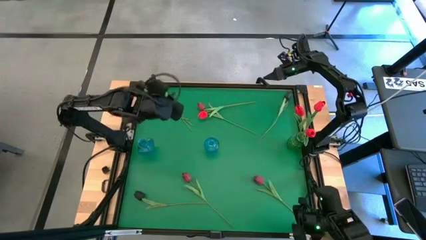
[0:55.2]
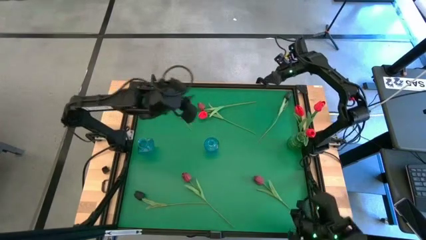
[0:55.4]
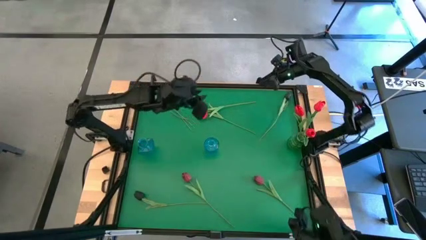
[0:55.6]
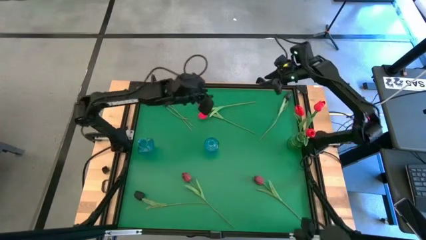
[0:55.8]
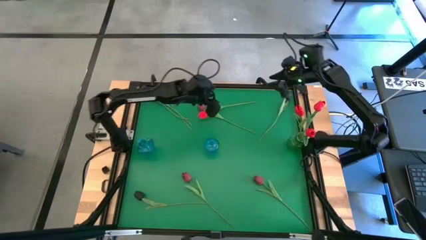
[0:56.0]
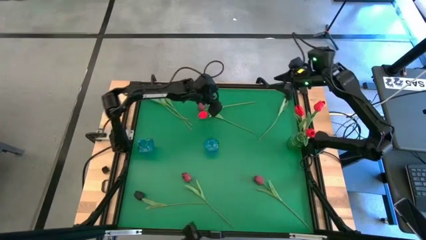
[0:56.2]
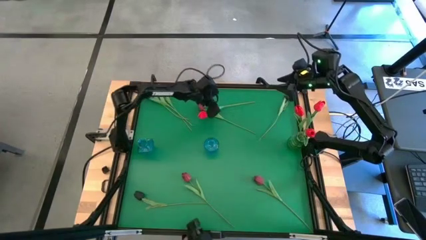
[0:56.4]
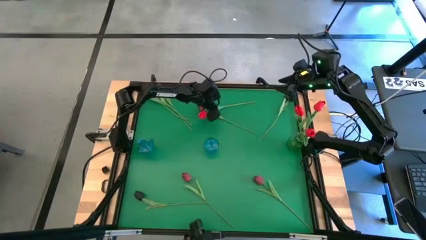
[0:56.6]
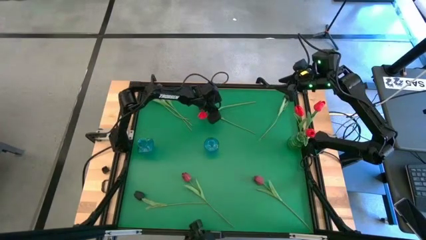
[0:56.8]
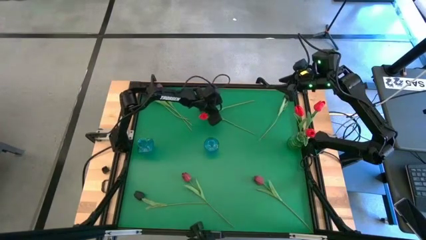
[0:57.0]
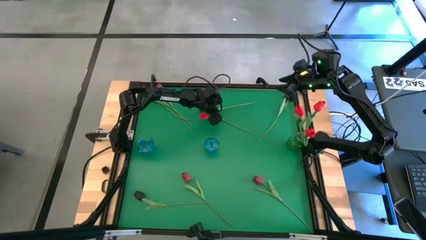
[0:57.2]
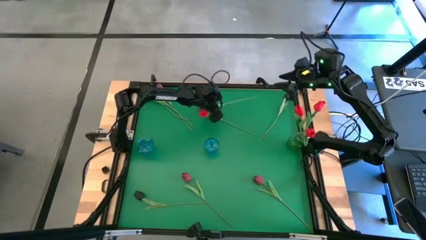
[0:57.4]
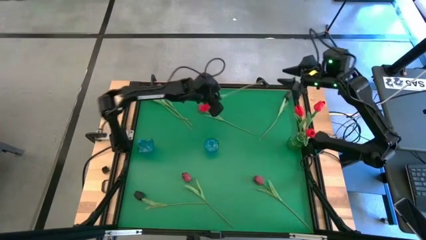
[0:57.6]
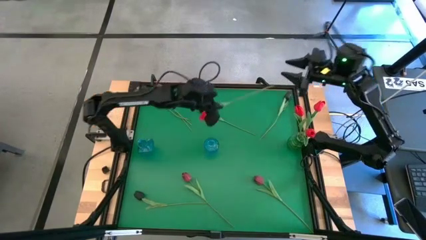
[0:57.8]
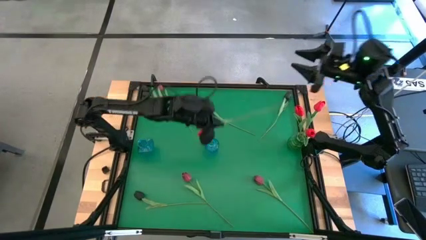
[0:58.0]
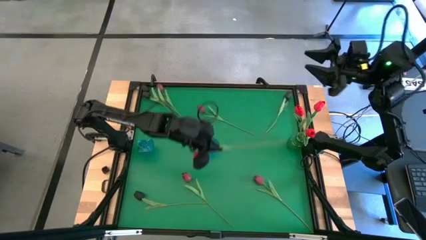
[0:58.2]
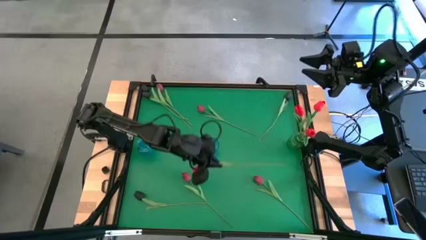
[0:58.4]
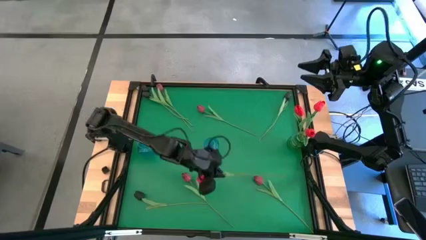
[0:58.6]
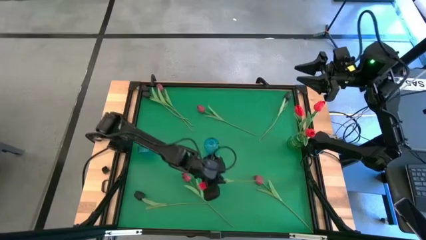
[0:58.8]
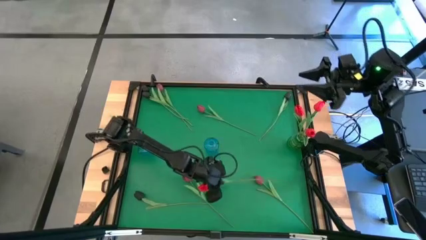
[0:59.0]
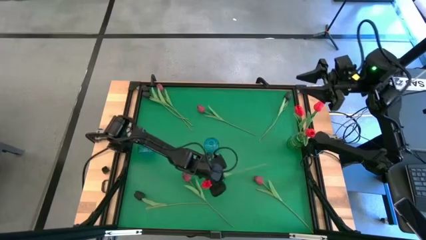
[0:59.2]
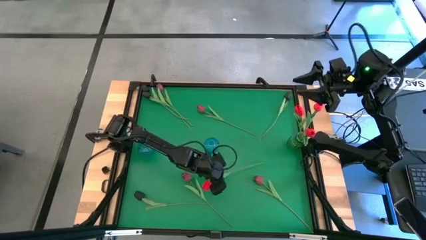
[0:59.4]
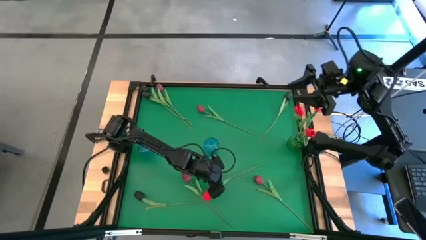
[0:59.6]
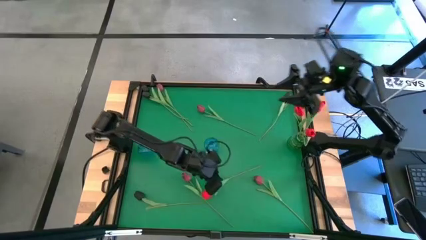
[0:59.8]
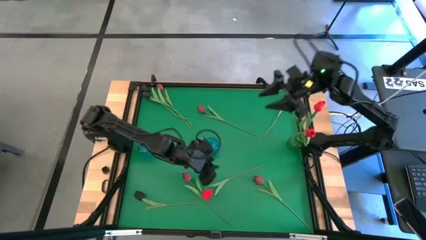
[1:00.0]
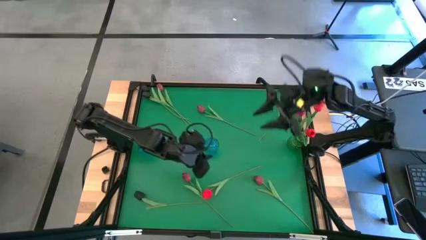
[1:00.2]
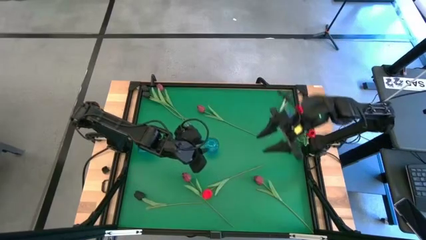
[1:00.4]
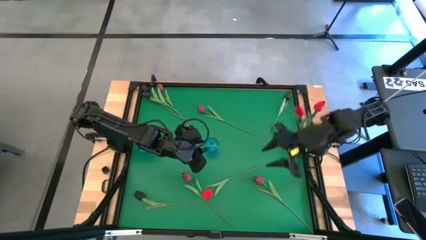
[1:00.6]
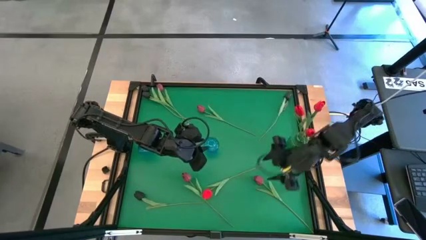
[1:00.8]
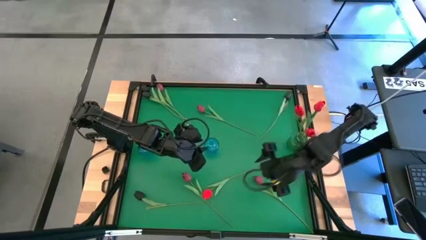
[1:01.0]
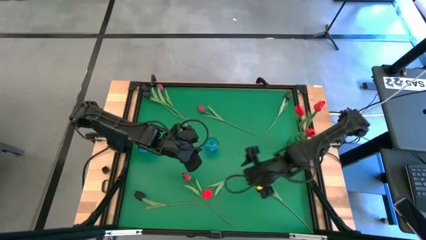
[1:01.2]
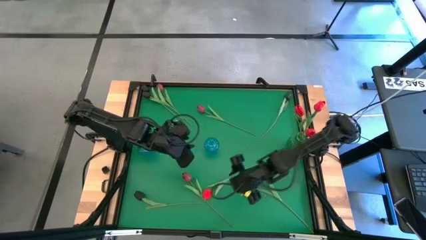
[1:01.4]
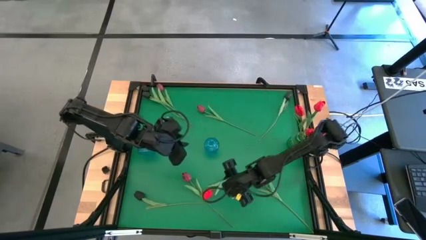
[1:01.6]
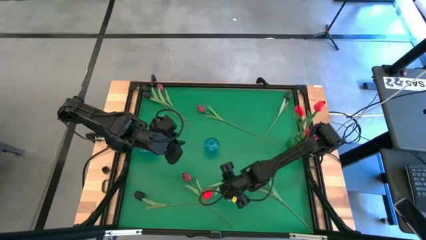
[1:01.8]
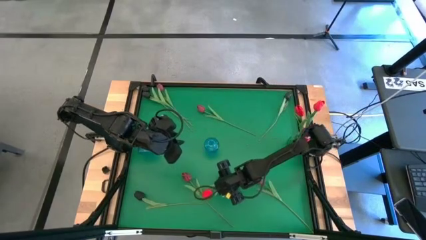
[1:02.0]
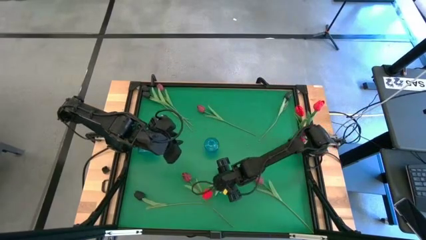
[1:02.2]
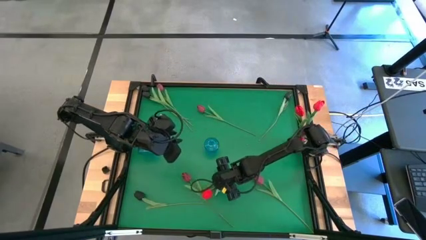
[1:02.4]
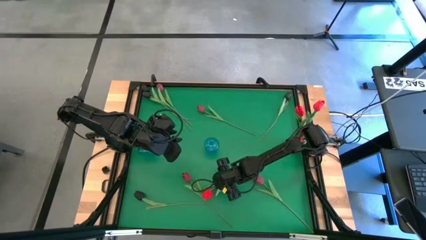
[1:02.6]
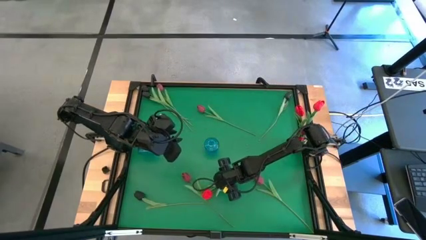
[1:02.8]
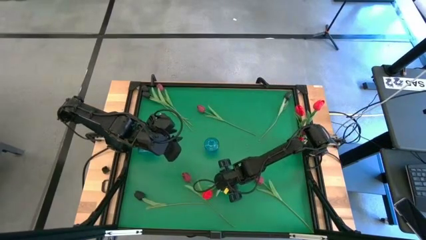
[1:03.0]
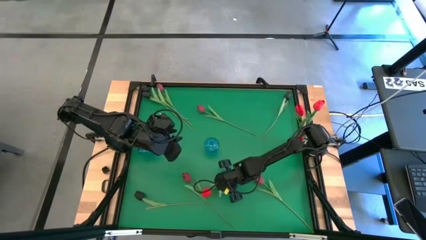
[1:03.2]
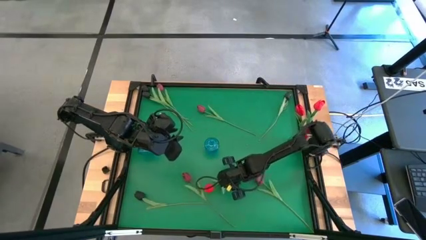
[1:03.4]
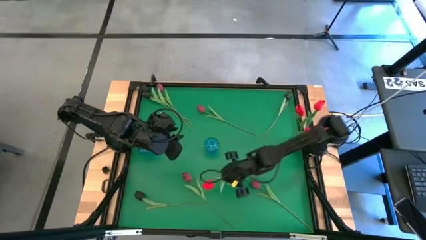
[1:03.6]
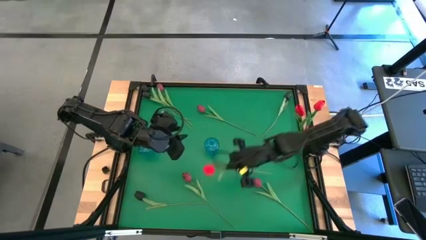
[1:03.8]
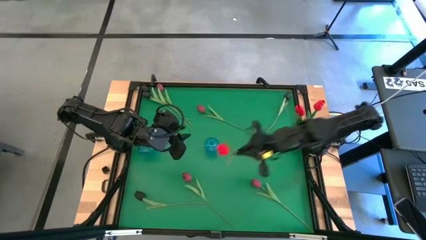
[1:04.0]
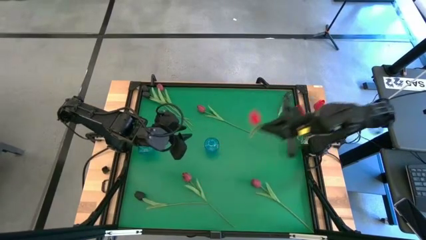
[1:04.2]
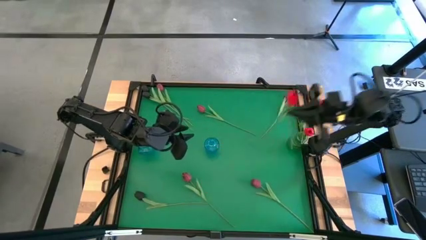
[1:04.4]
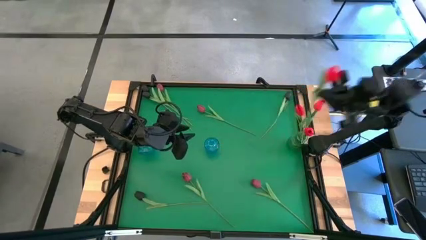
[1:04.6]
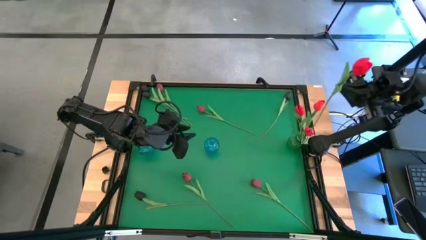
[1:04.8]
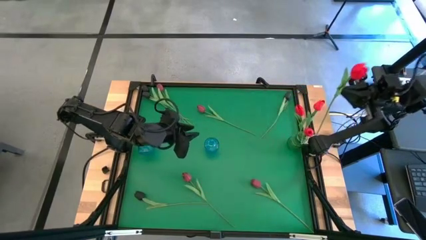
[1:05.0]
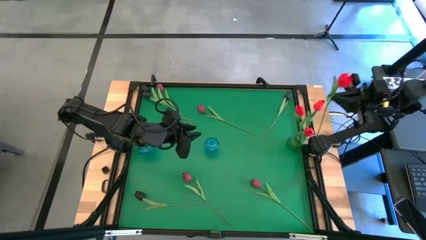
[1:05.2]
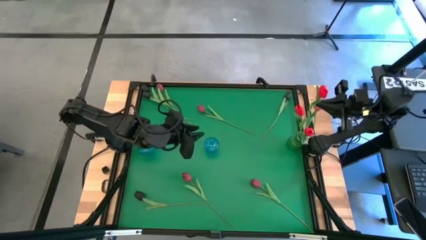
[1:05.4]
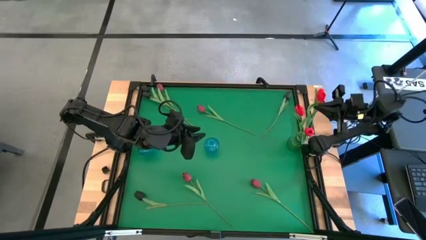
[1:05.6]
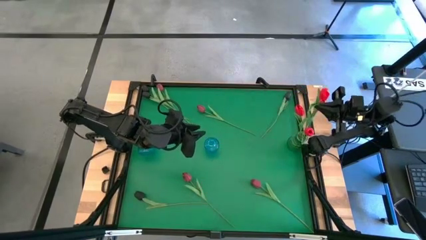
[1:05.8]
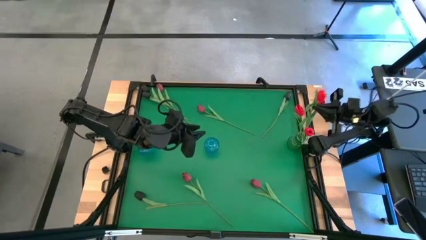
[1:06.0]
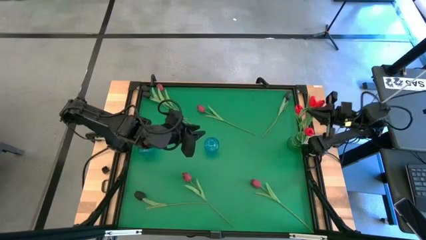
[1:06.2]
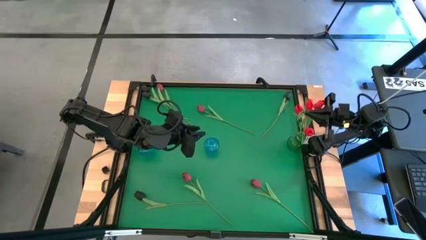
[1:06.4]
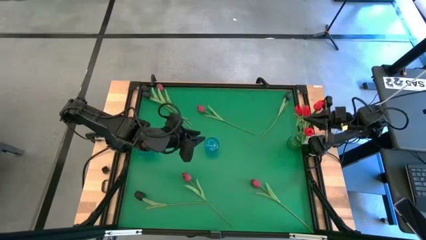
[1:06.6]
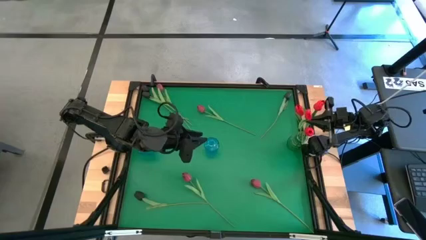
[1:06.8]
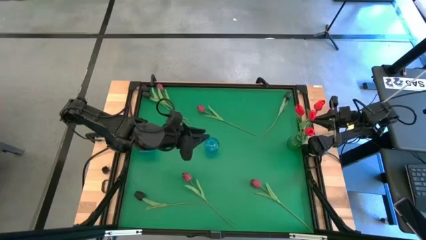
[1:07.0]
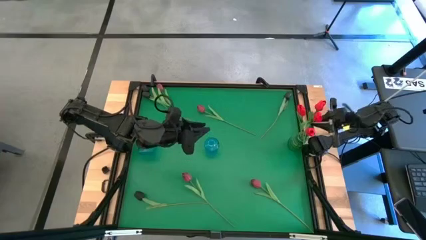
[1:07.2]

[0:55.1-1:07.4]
Task: Sort flowers into vase by color
Put the pink flower into the green flower vase

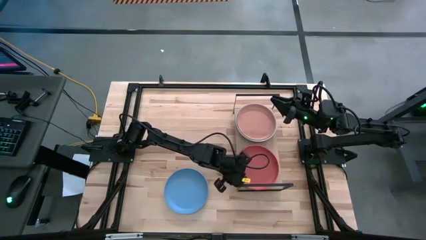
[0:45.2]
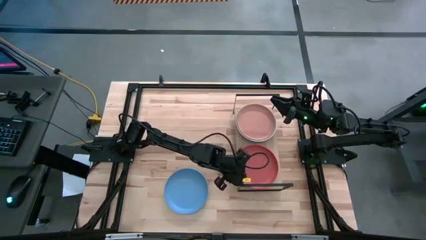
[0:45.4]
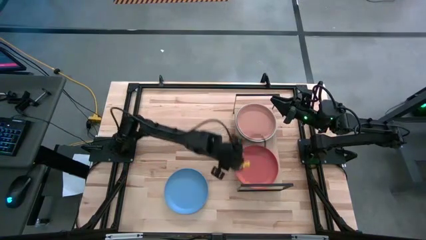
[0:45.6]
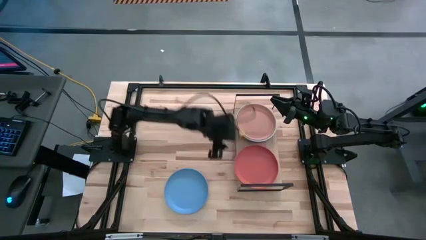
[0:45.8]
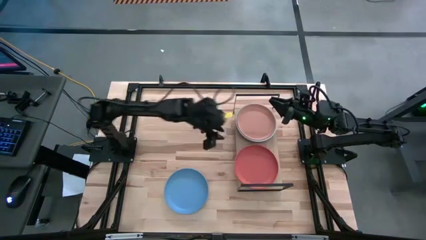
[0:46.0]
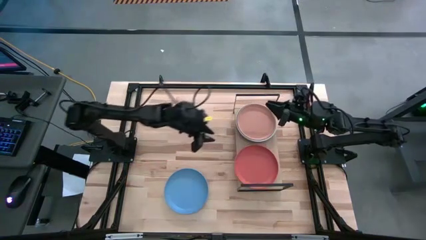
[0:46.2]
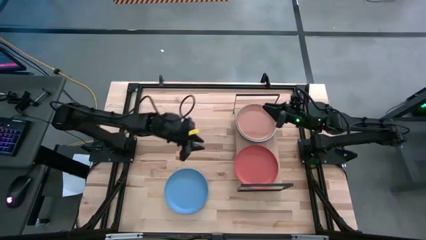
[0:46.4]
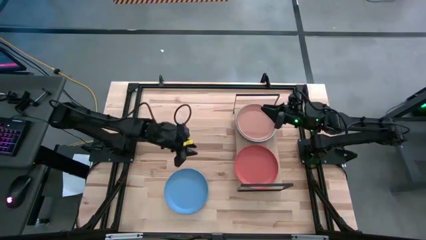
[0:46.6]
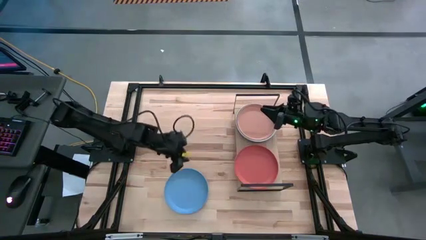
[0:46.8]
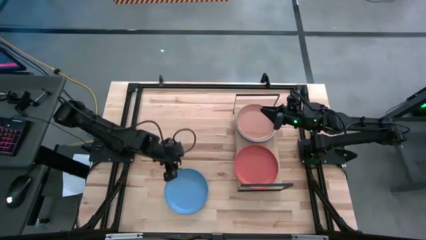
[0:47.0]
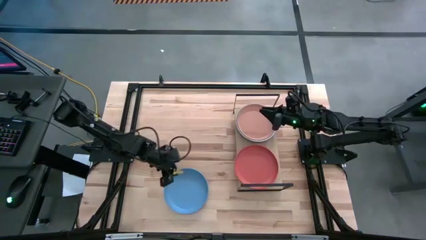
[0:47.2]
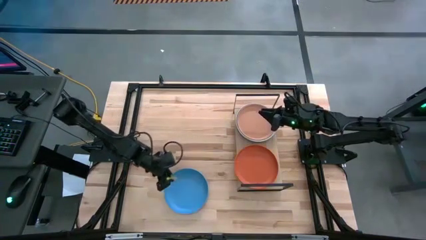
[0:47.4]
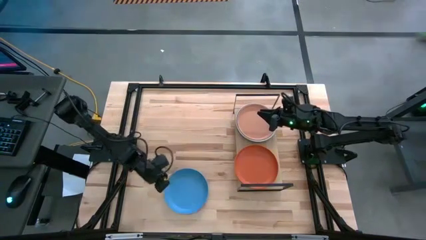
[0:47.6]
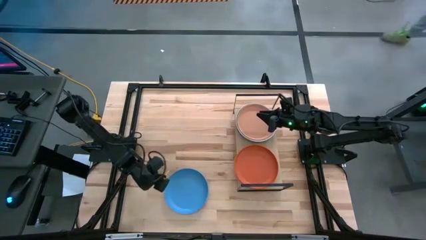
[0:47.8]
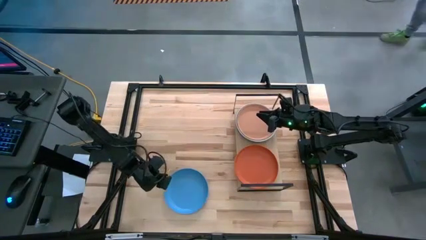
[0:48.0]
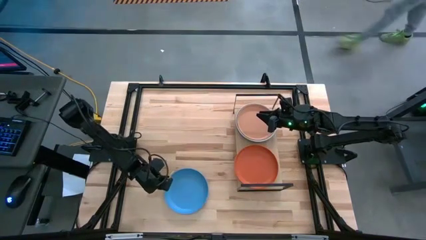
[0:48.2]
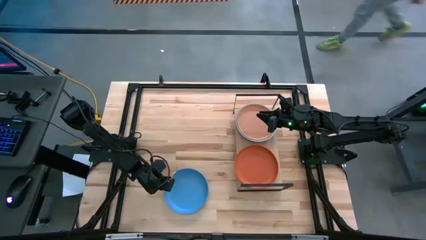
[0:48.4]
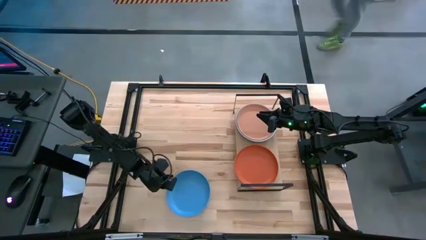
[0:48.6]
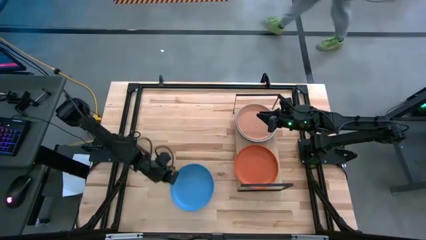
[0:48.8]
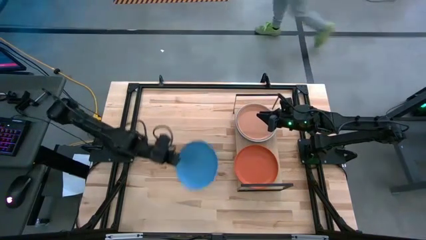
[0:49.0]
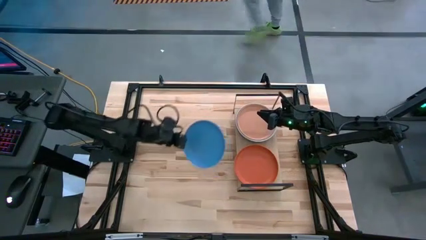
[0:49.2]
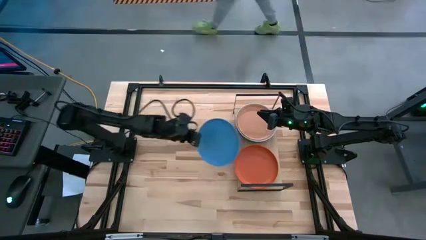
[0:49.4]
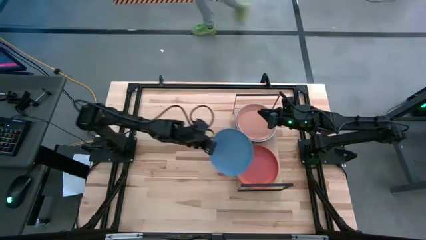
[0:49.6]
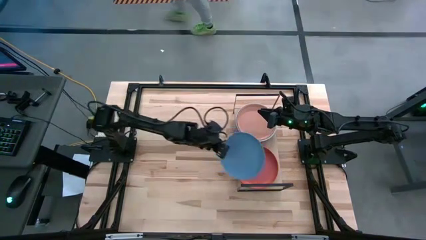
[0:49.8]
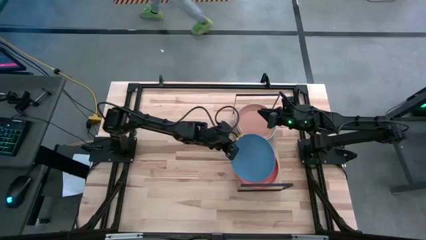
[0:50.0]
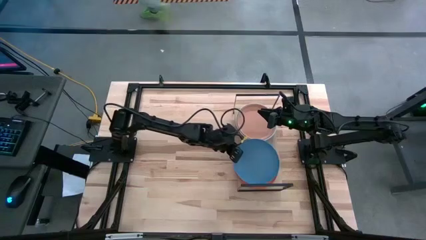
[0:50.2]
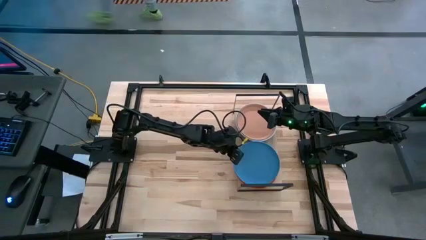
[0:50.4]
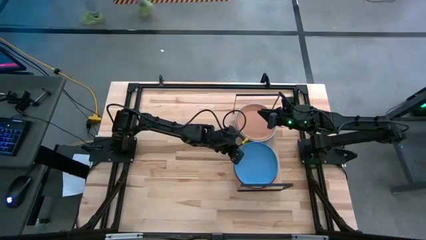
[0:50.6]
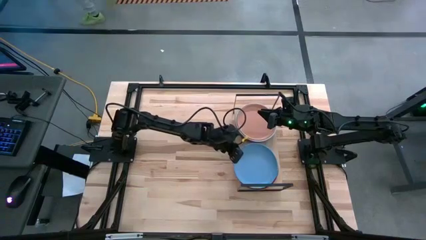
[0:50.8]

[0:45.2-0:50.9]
Task: Place and stack plates onto a shelf
Stack the blue plate on top of the orange plate
